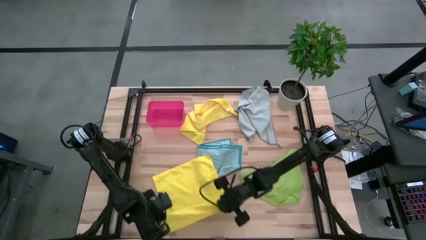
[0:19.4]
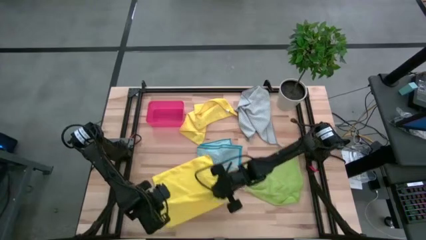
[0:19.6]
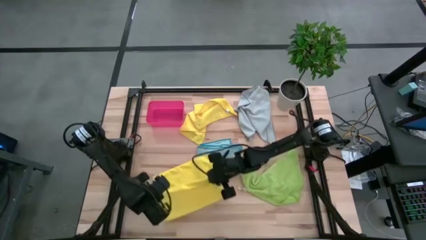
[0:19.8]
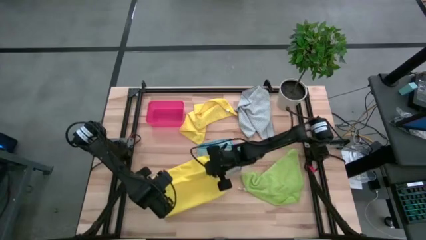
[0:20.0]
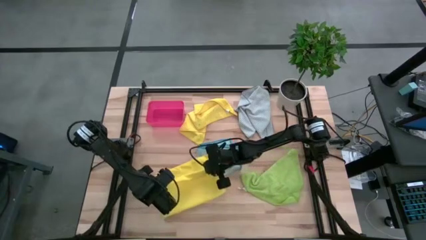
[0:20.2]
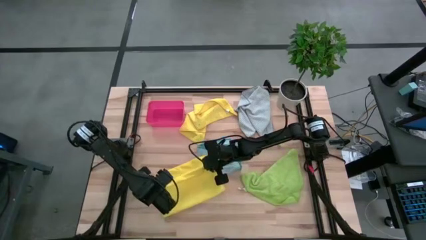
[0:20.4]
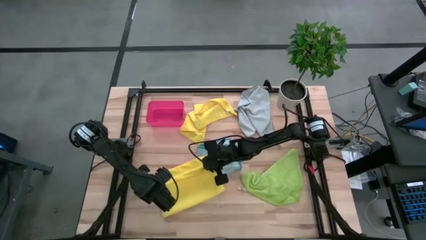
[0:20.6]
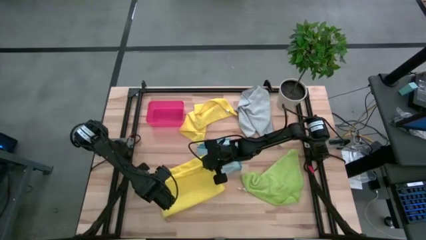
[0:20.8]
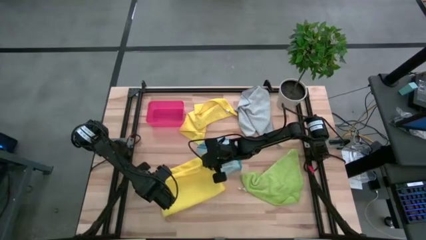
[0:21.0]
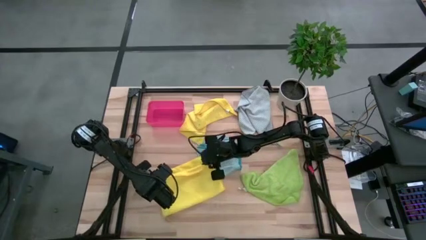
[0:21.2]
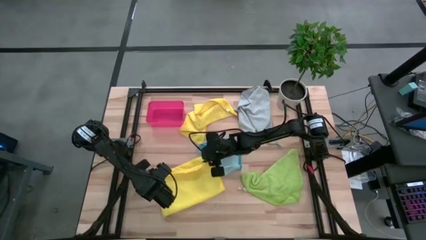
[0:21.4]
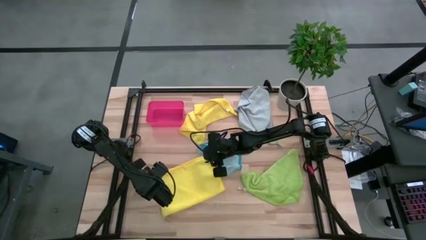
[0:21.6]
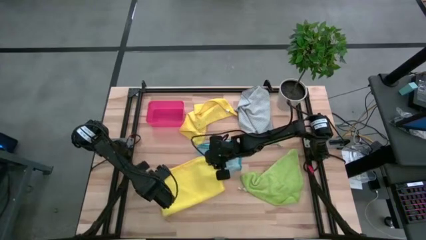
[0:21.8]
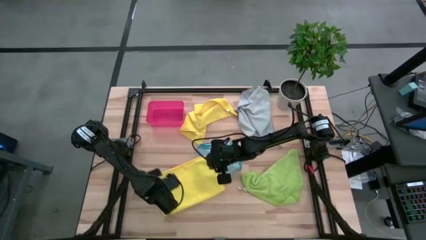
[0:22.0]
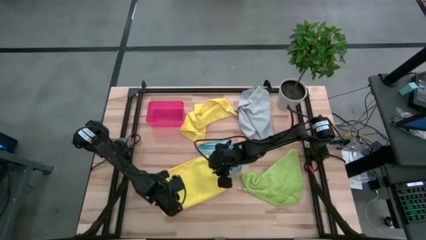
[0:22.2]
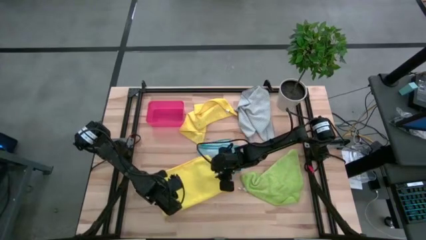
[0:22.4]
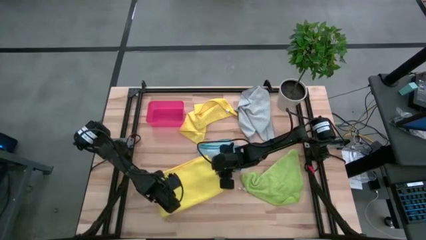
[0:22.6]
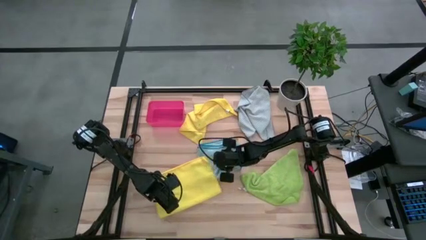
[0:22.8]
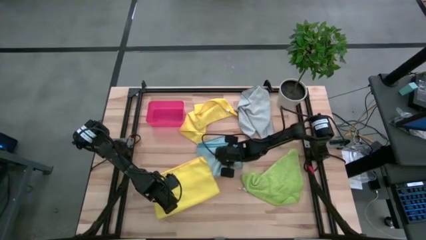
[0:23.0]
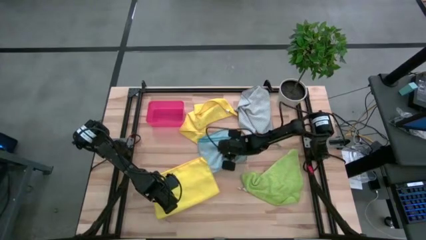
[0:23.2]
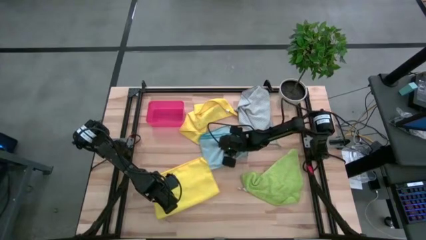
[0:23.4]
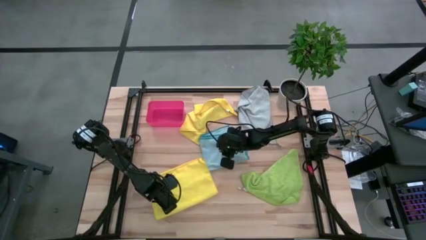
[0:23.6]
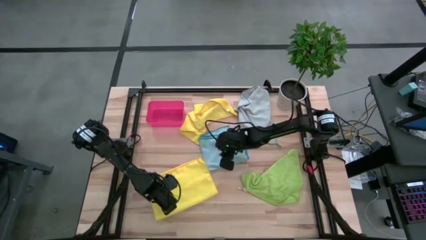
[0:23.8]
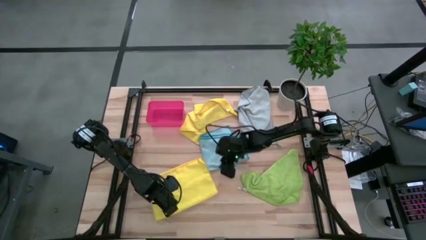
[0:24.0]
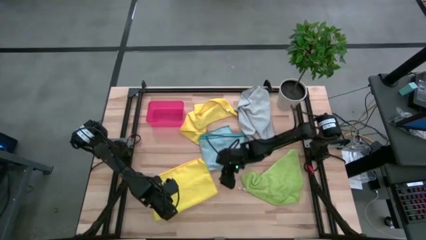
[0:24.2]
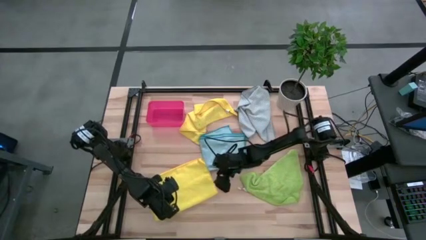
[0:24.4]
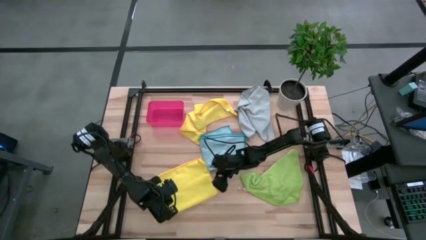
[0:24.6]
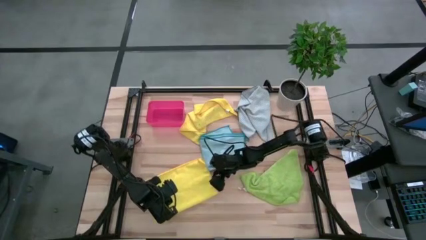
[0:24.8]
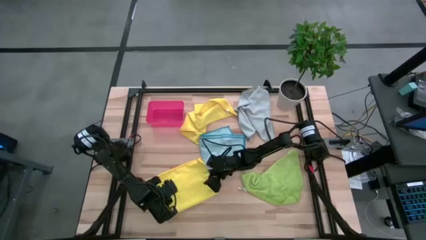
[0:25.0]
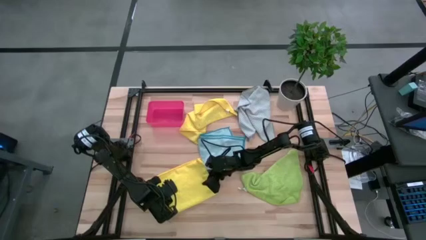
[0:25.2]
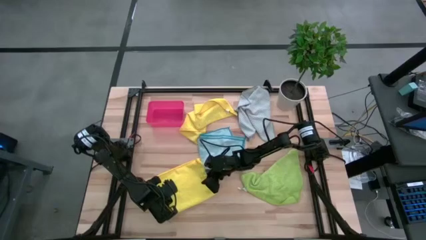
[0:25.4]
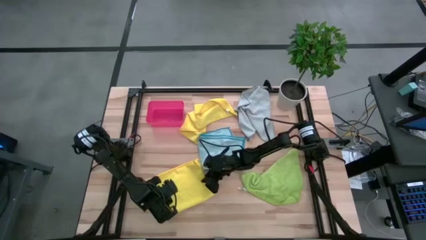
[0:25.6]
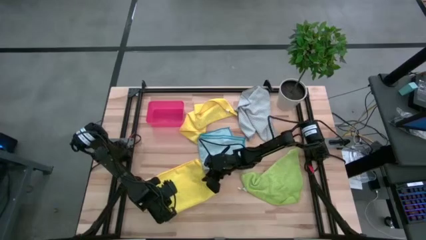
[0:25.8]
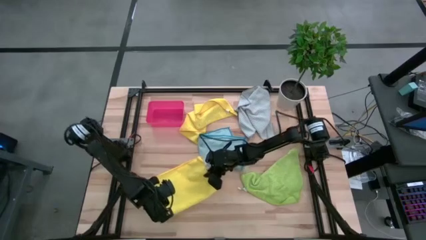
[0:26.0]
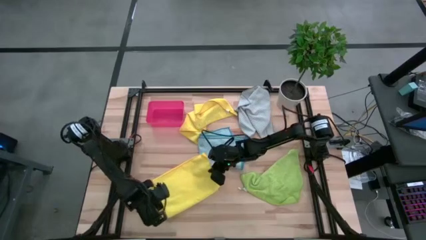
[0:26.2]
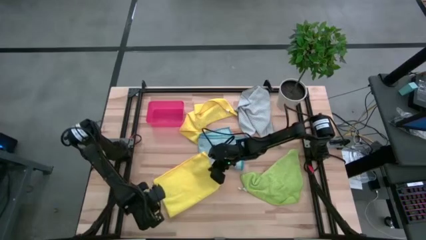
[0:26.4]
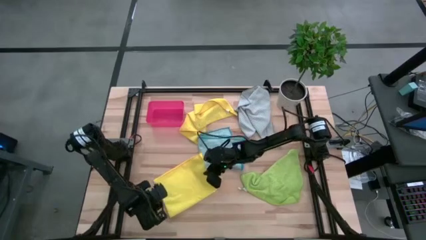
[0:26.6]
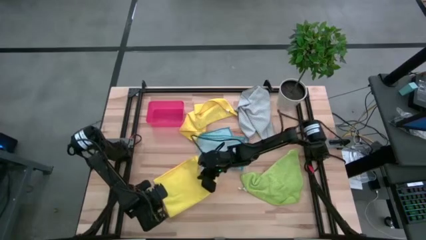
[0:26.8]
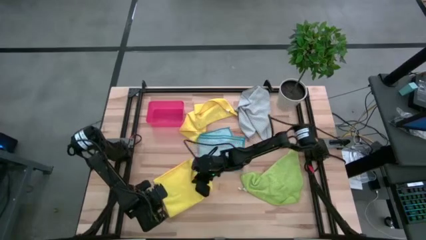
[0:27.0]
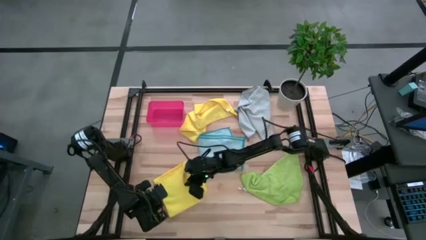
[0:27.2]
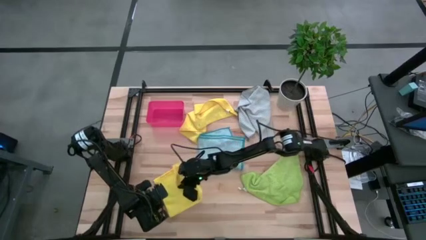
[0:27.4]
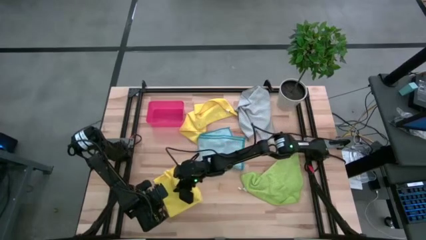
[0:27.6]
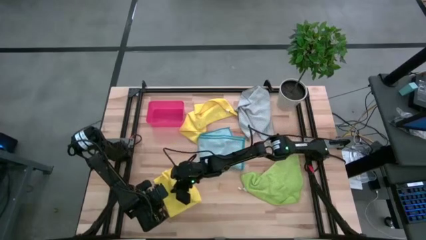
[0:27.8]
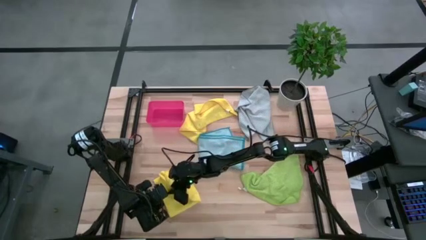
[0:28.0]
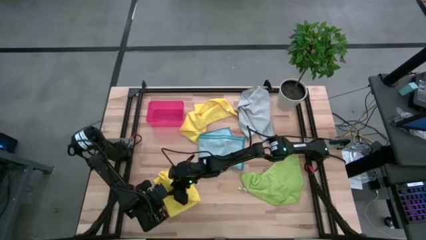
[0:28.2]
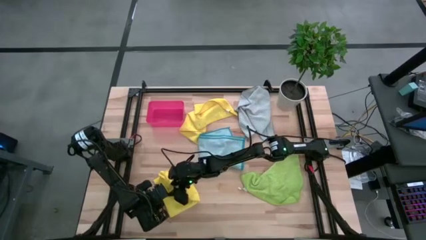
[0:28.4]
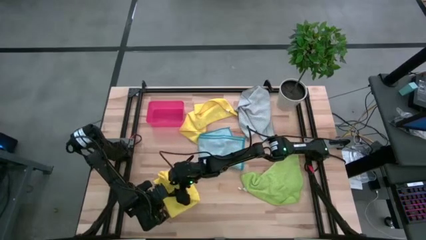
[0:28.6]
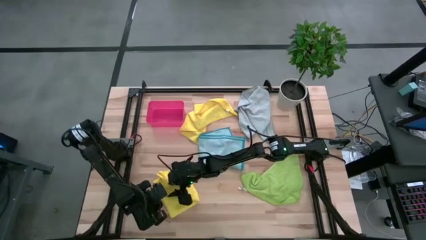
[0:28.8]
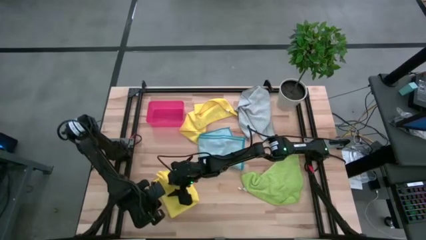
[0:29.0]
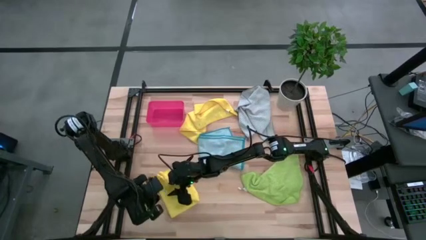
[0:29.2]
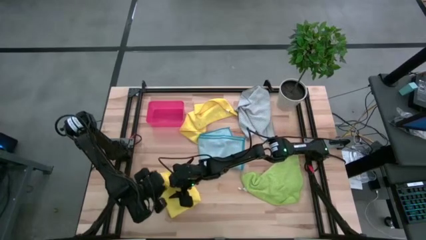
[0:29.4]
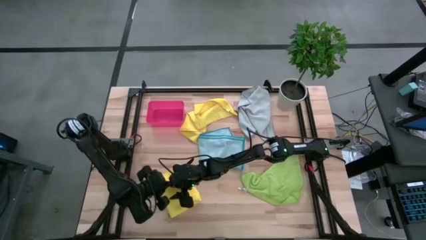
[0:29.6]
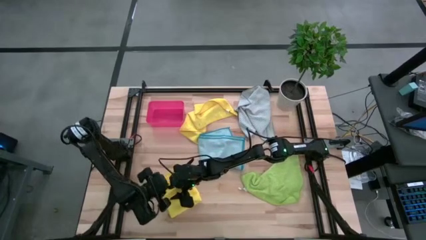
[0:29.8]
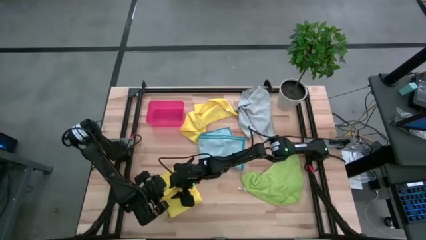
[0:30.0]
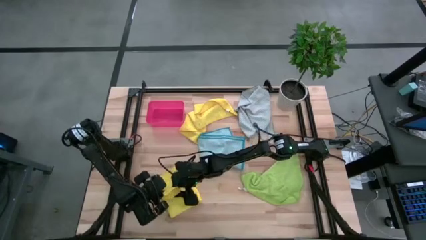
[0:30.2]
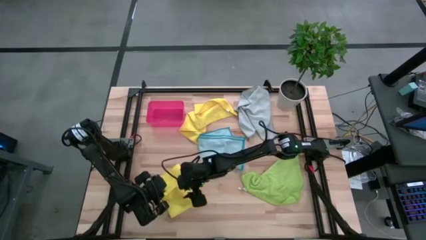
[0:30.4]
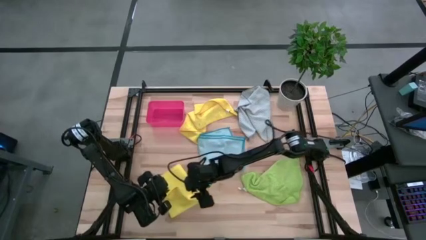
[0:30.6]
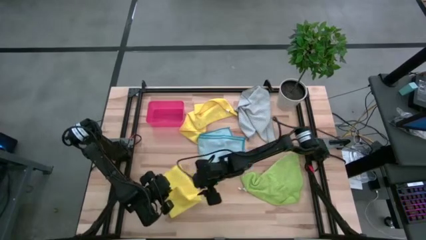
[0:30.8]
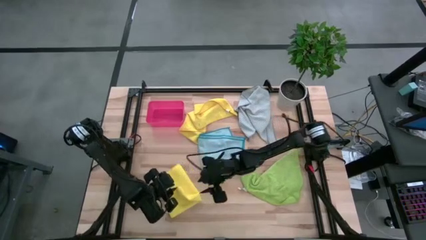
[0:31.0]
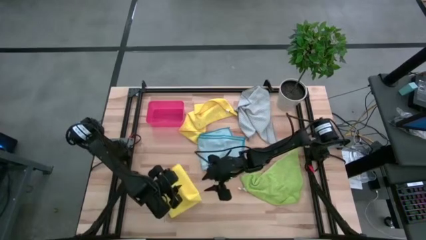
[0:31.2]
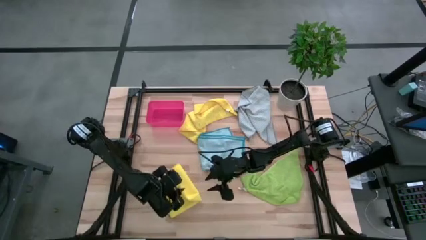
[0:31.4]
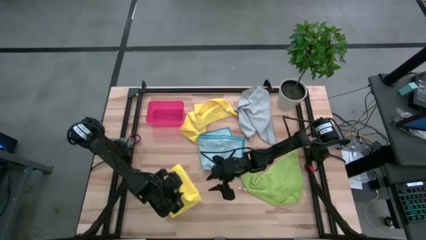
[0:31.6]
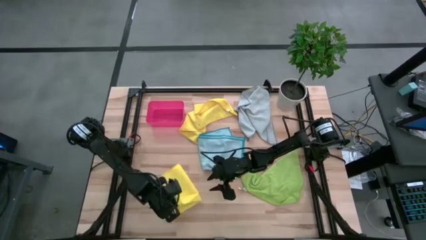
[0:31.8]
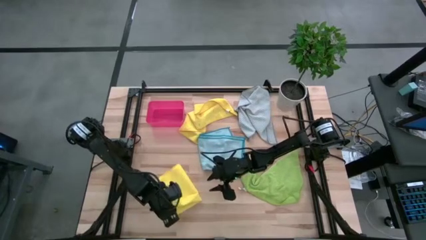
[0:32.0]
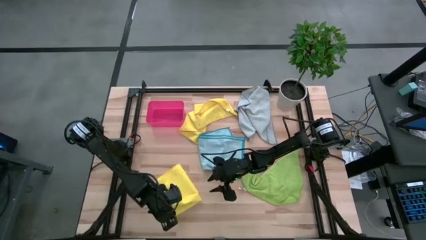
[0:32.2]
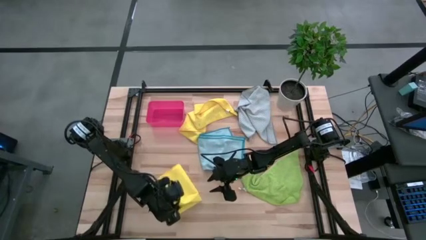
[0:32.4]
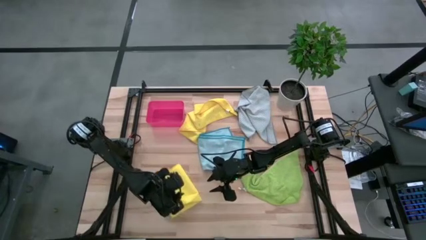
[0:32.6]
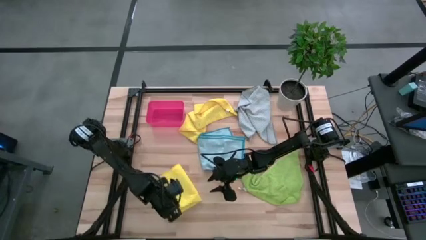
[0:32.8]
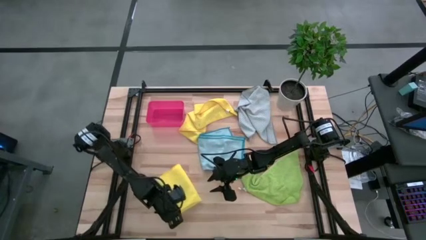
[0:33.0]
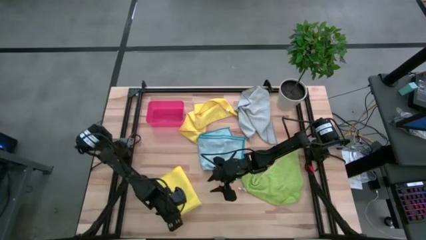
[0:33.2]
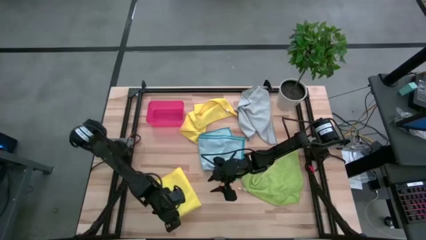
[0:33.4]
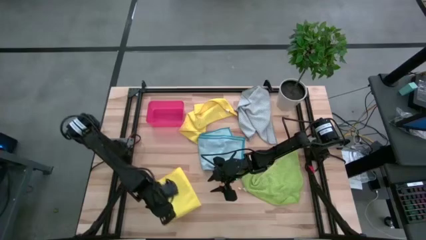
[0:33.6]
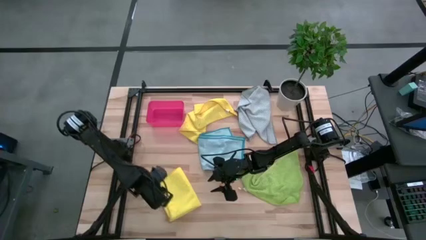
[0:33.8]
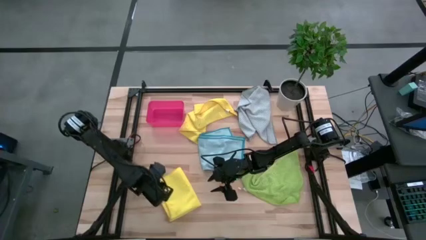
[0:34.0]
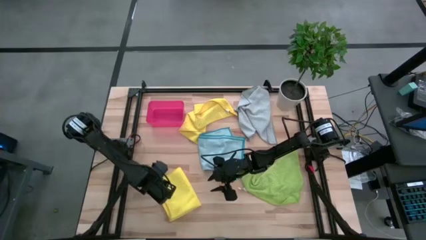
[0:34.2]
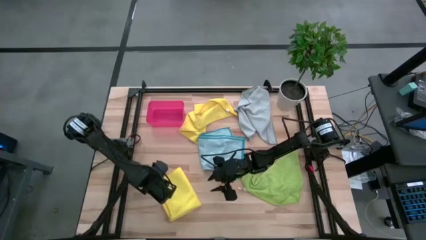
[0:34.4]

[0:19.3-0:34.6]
Task: Fold microfiber towels
Fold the bottom yellow microfiber cloth
